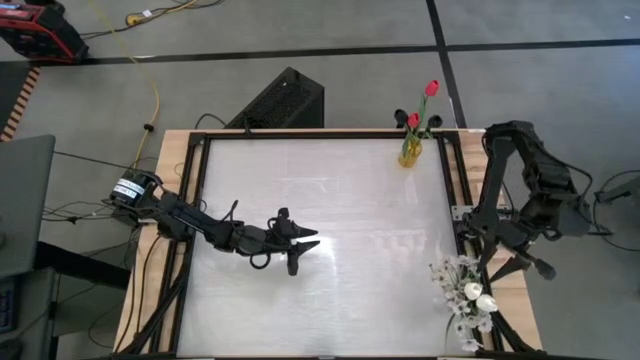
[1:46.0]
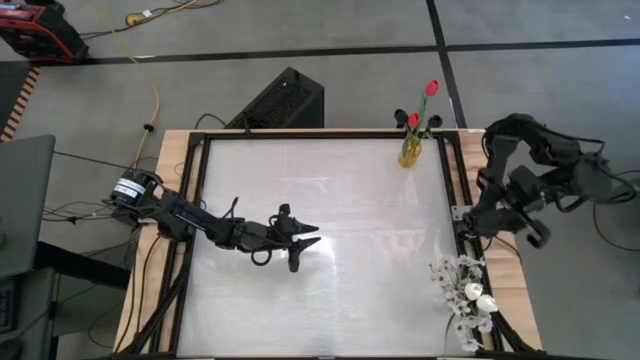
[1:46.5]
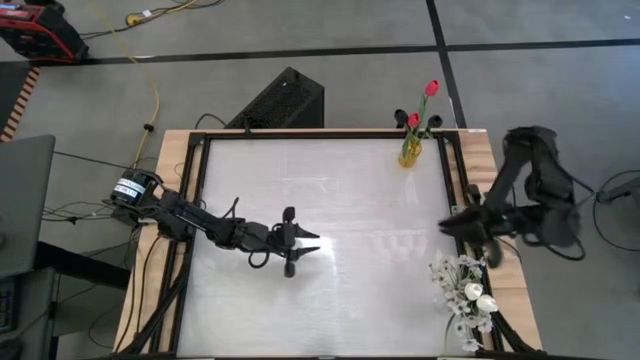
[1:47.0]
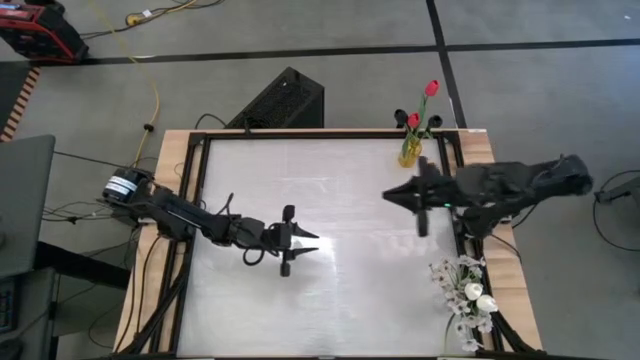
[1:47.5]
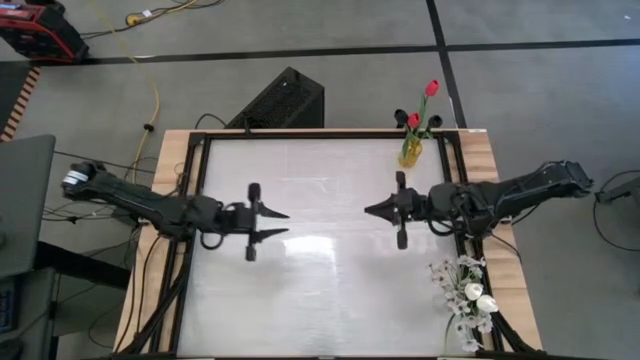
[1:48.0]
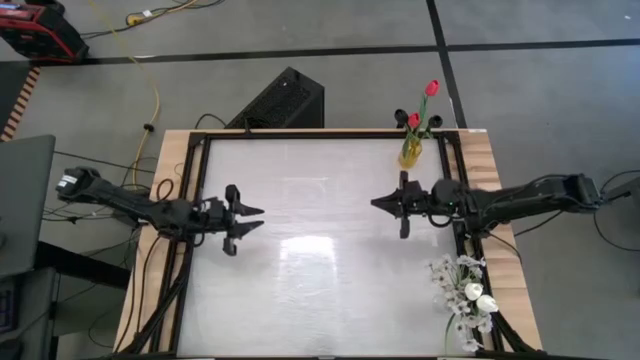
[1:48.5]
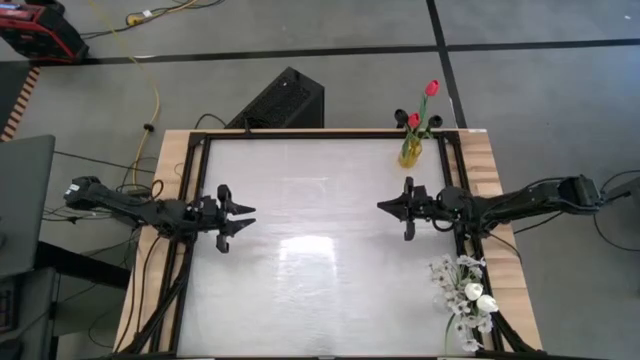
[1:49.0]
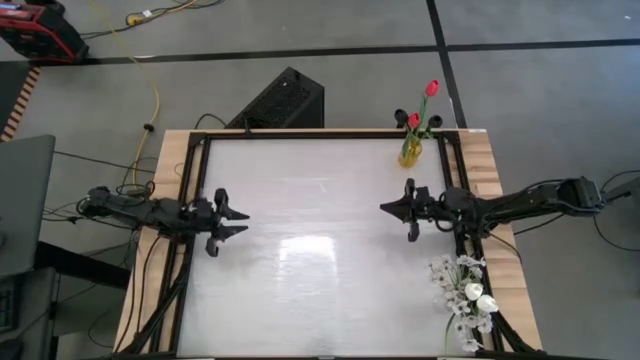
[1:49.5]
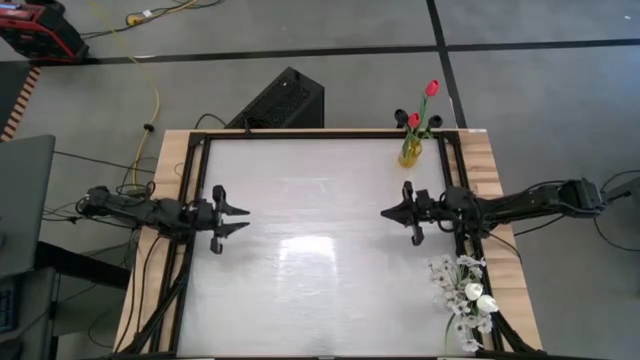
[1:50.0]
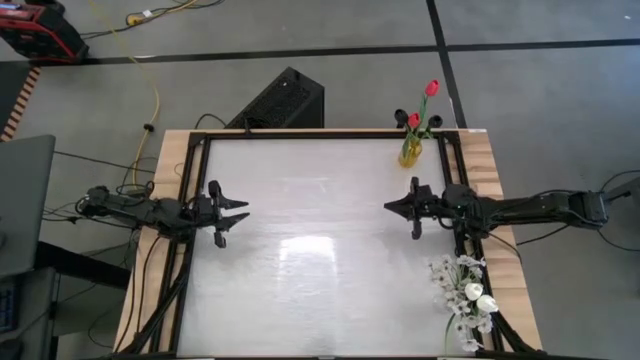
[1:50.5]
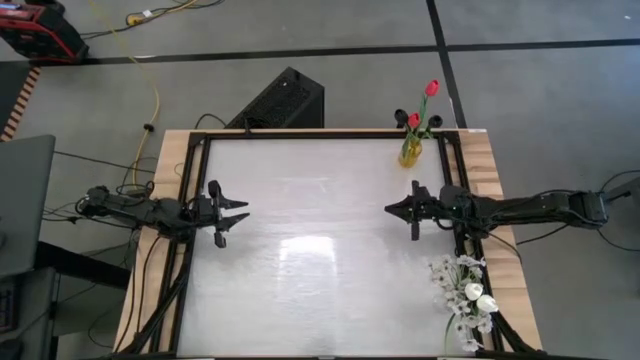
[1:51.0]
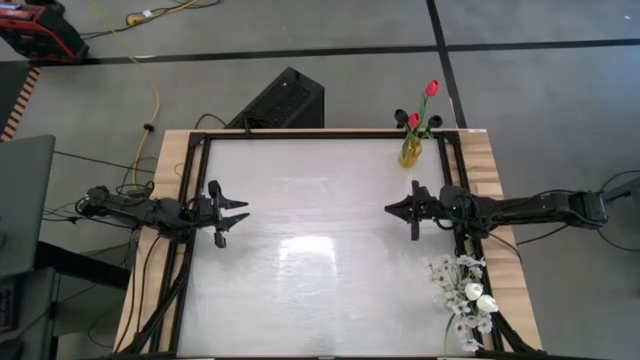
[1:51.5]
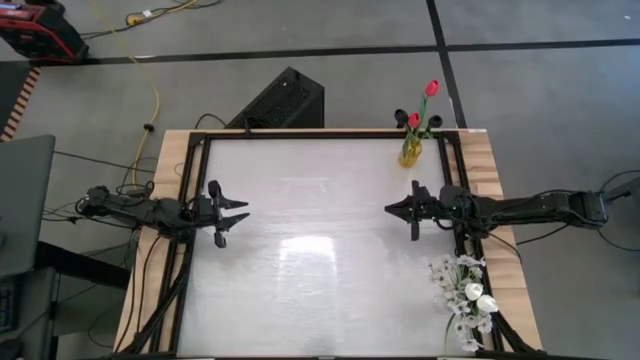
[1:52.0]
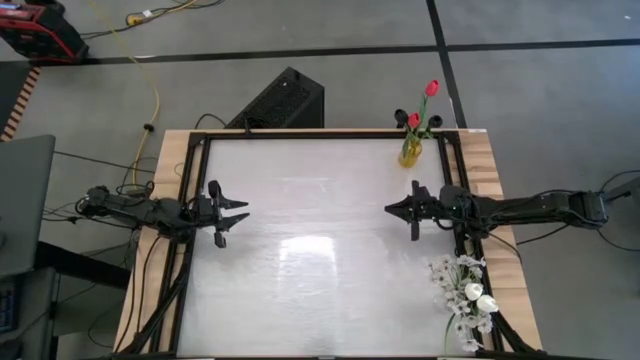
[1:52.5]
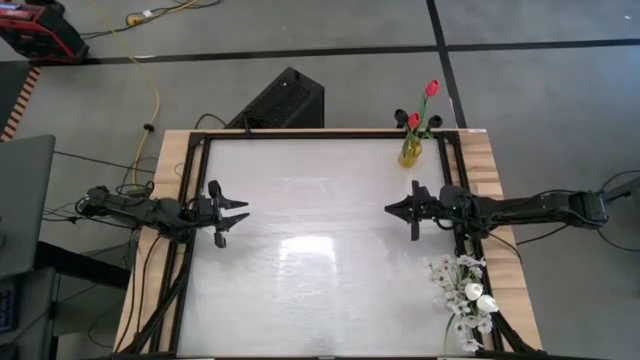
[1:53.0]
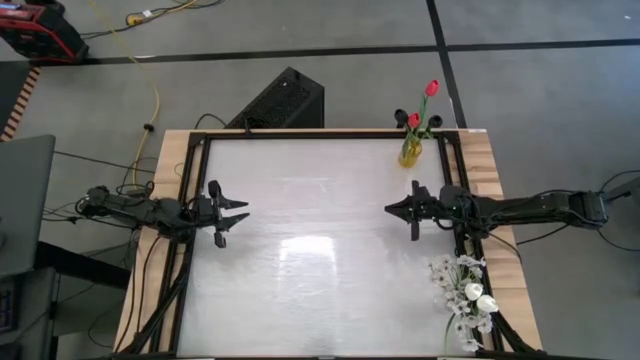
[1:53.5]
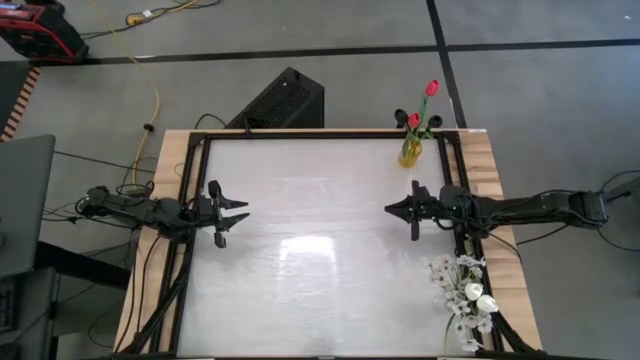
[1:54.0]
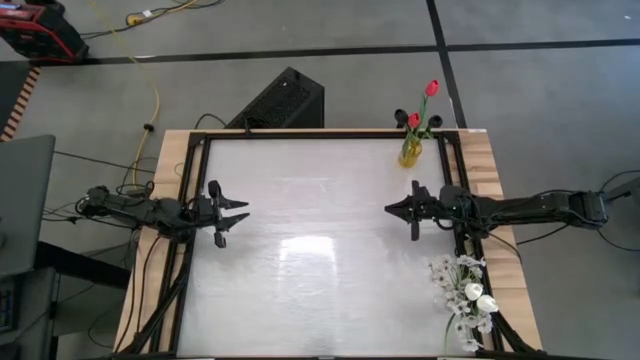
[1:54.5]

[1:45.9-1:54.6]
Task: Sort flowers into vase by color
Return to Home Position

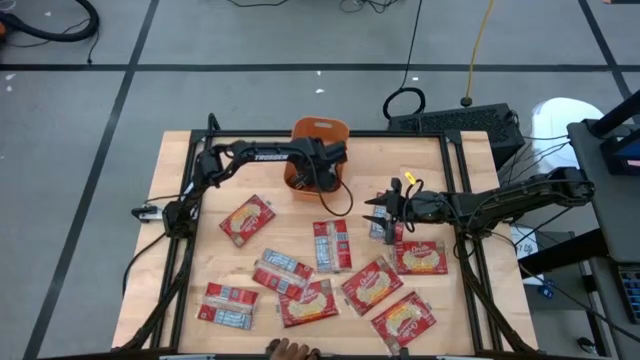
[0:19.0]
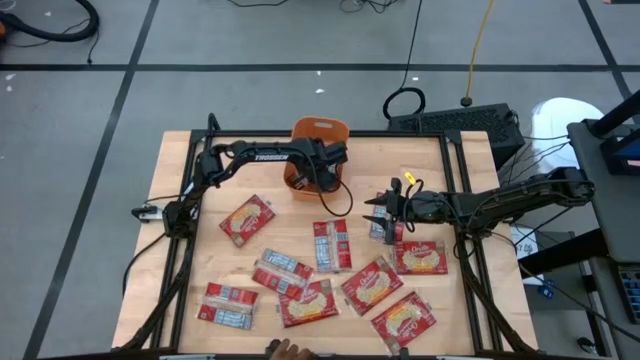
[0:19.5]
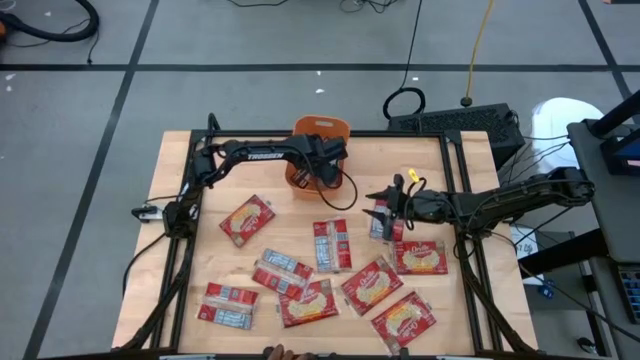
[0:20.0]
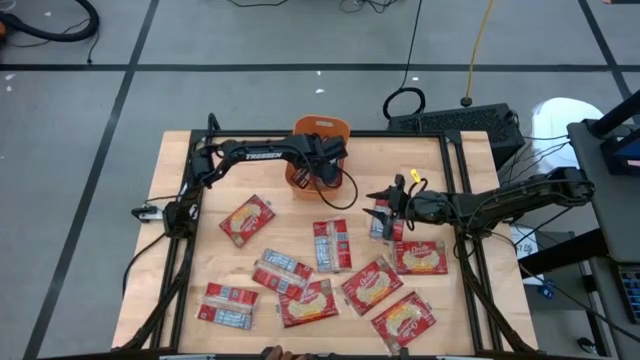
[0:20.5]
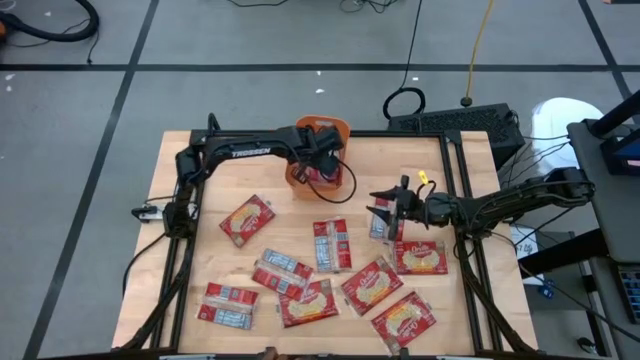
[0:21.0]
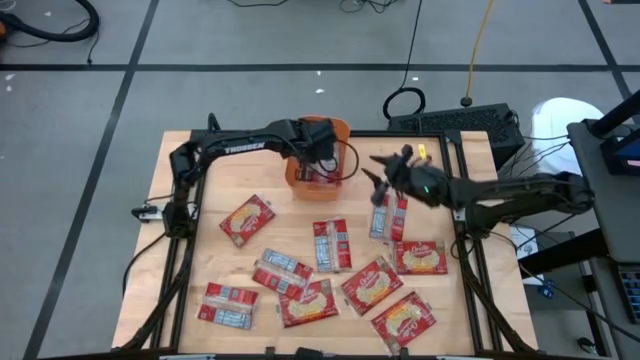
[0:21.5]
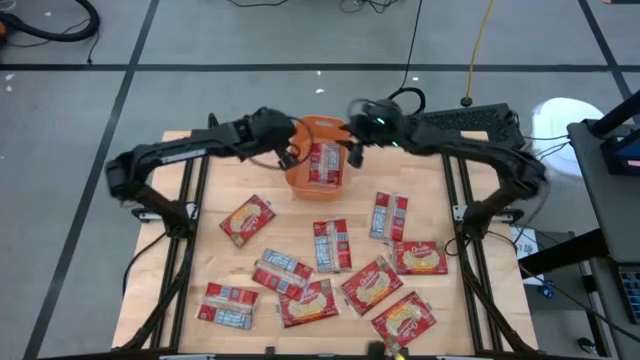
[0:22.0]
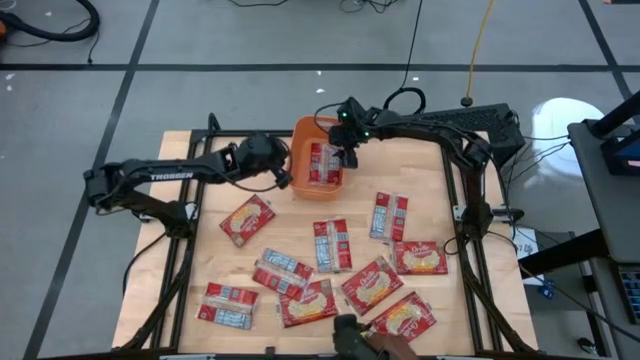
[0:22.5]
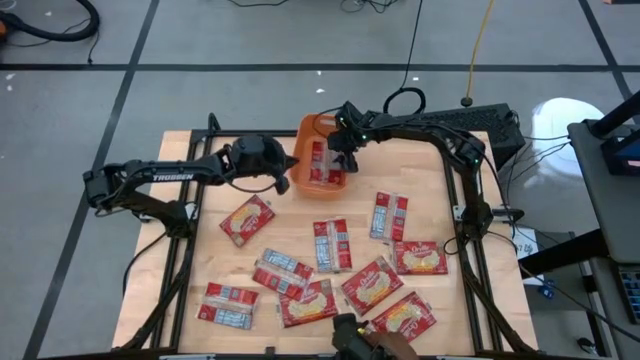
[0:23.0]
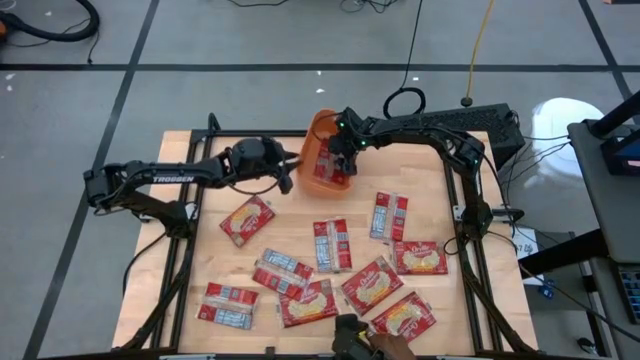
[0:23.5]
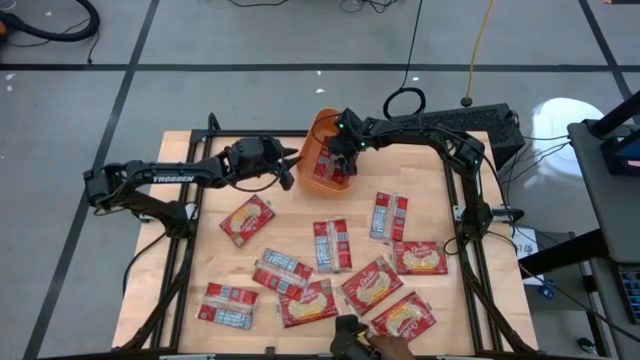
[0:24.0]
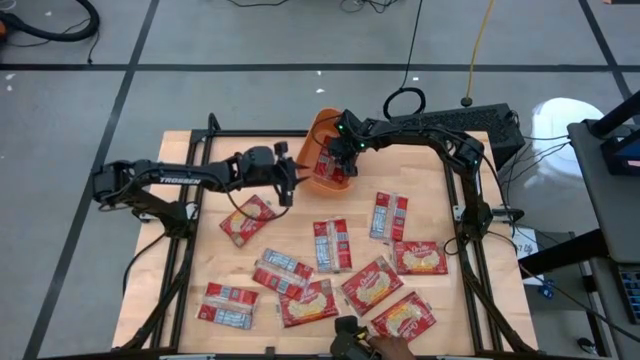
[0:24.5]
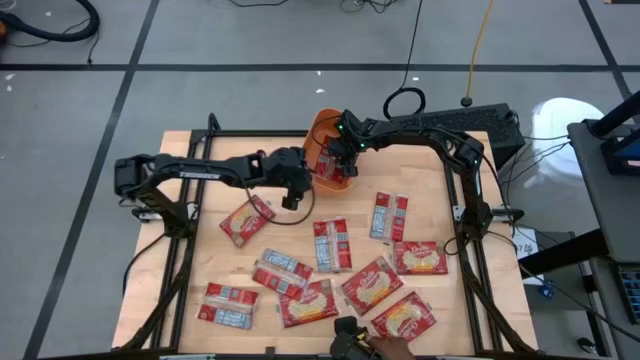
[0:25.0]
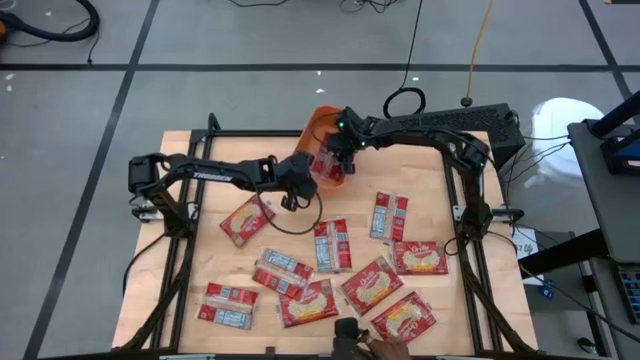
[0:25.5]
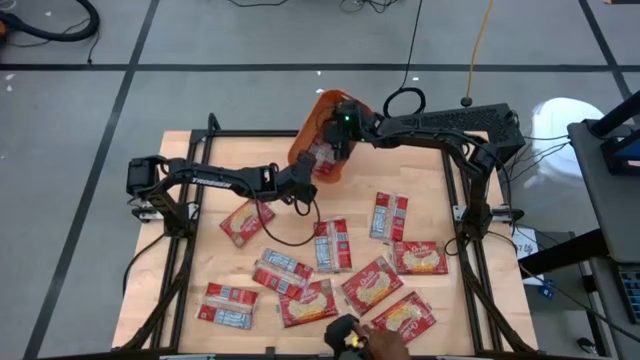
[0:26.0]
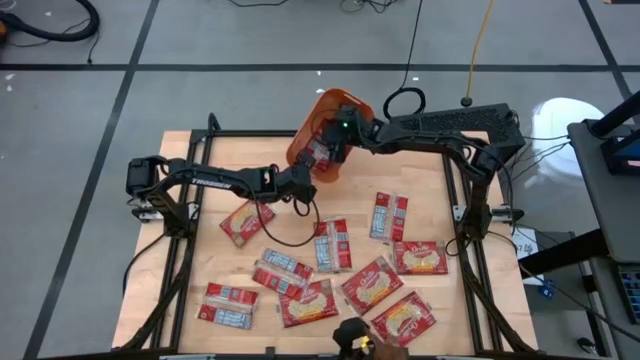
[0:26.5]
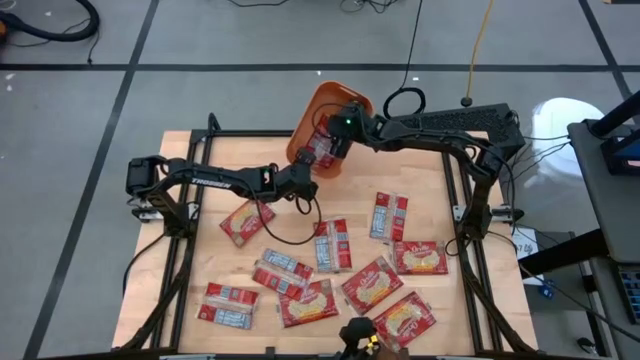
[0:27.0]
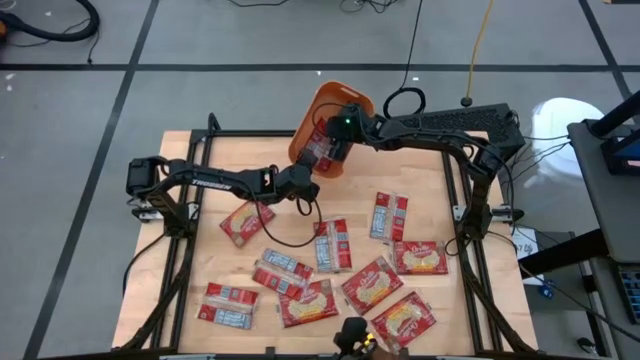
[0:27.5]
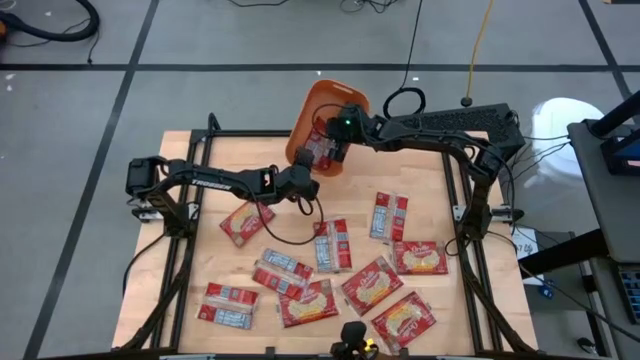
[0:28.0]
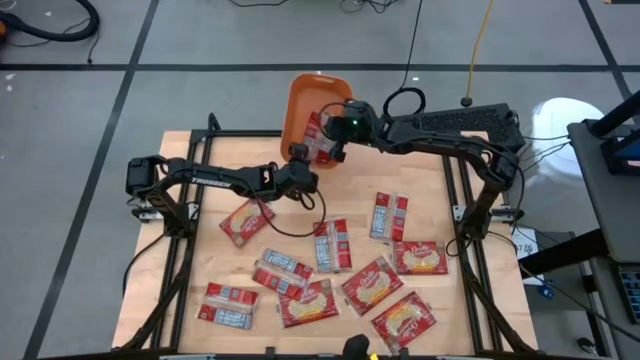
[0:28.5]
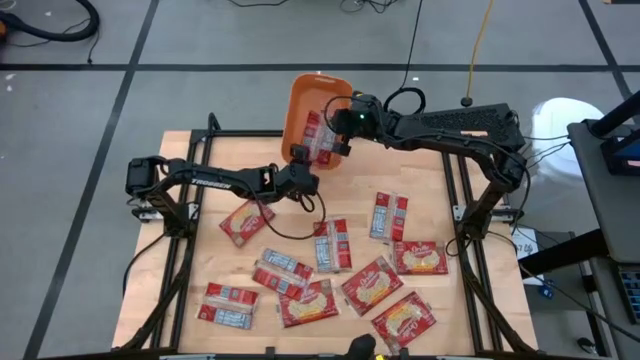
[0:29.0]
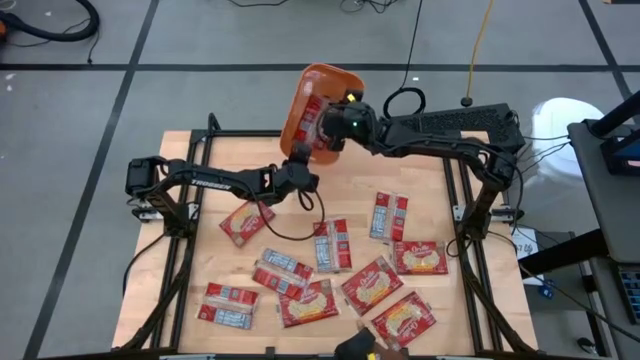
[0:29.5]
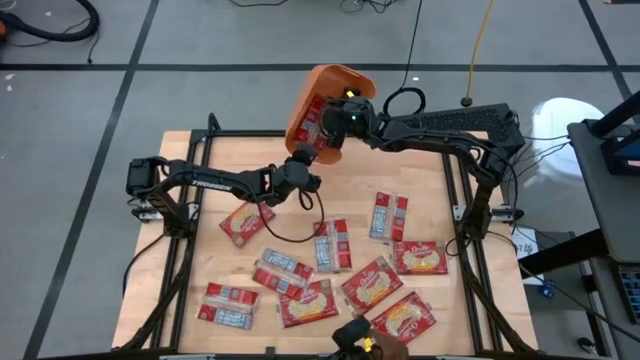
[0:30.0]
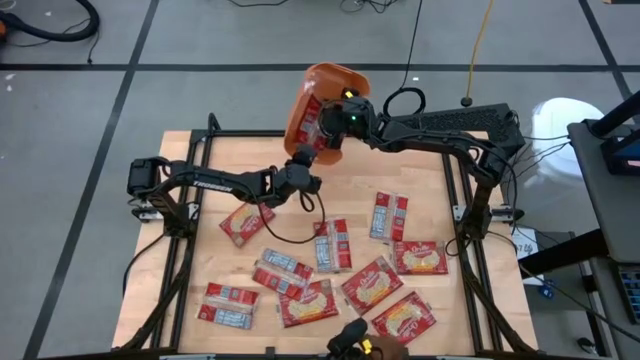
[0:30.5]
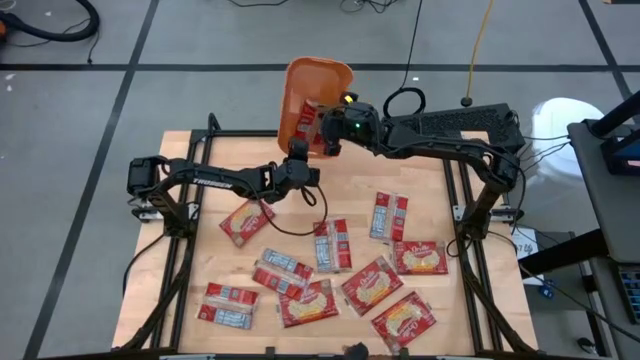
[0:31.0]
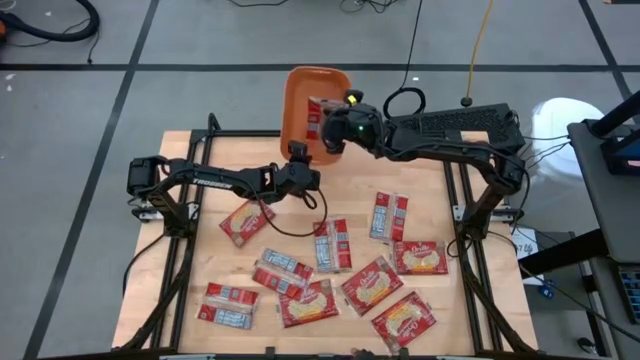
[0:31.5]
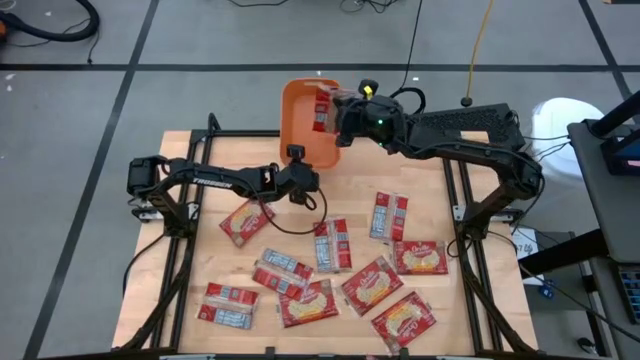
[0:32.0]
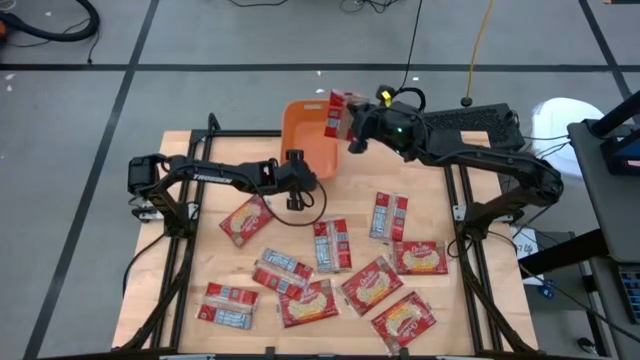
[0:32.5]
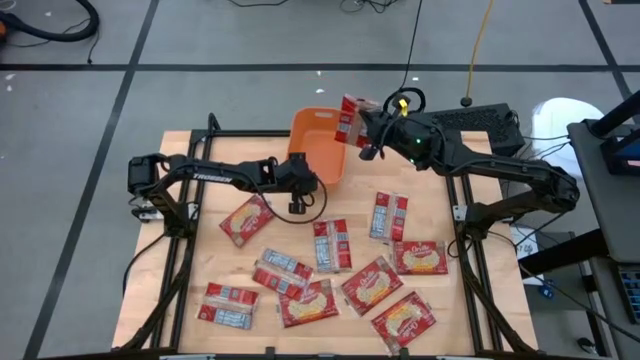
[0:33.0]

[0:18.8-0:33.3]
Task: Sort popcorn bags into baskets
Put the red popcorn bag into the orange bin
